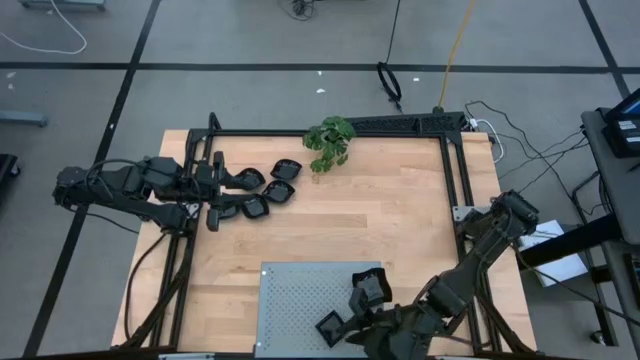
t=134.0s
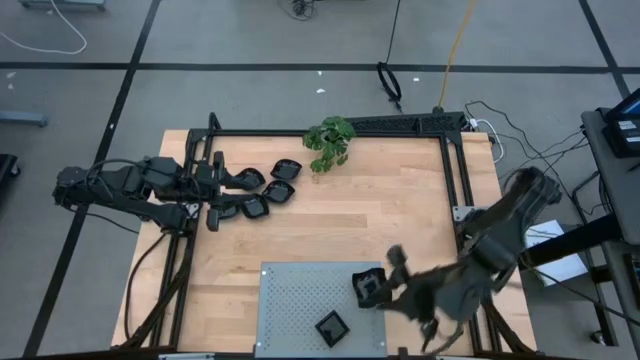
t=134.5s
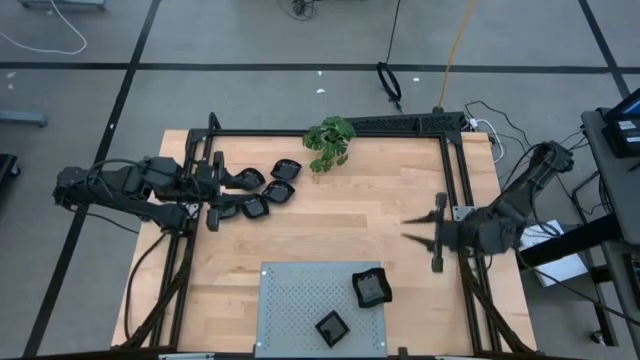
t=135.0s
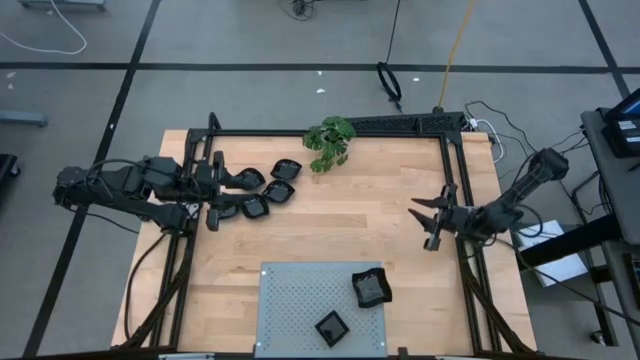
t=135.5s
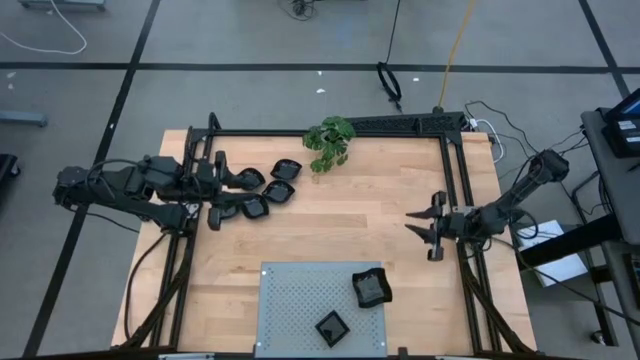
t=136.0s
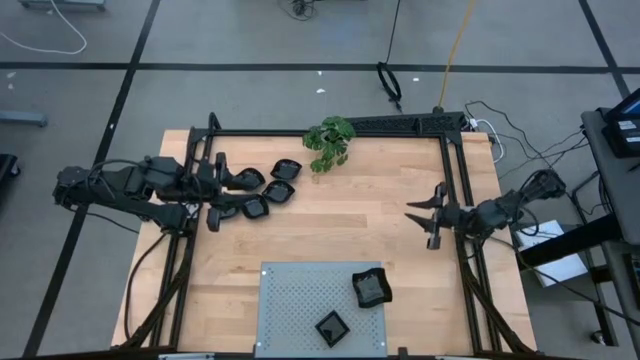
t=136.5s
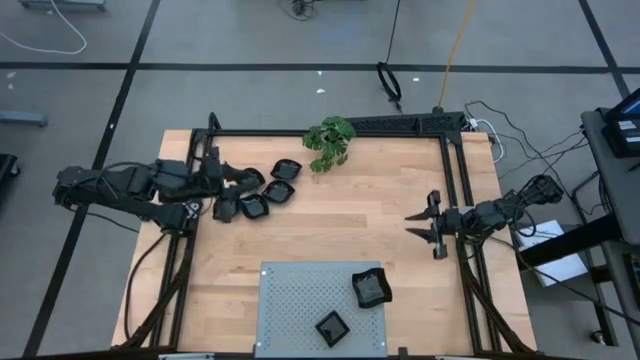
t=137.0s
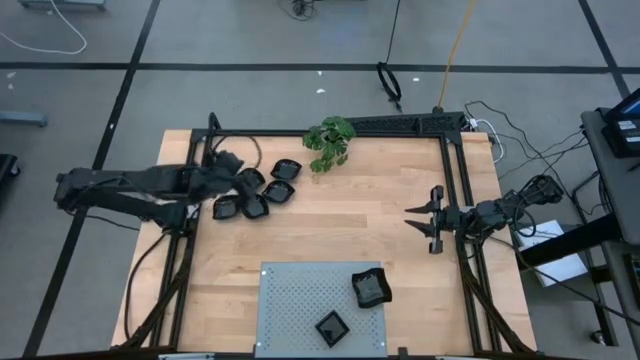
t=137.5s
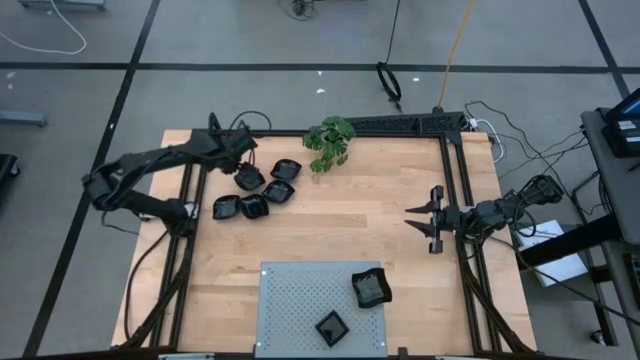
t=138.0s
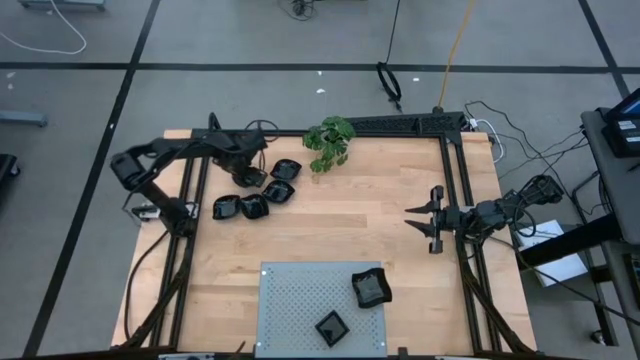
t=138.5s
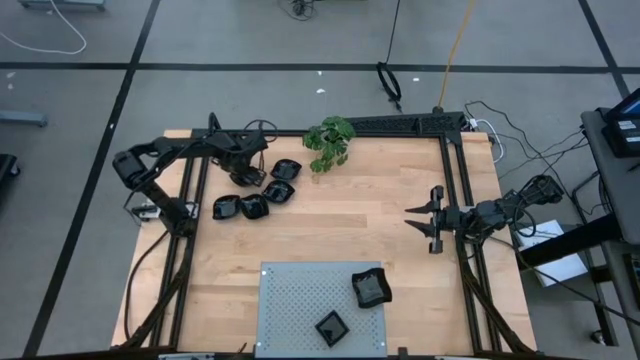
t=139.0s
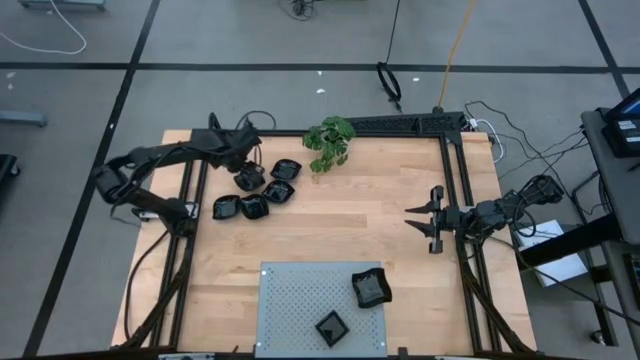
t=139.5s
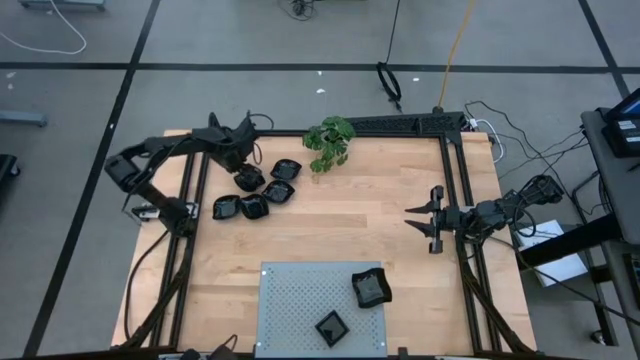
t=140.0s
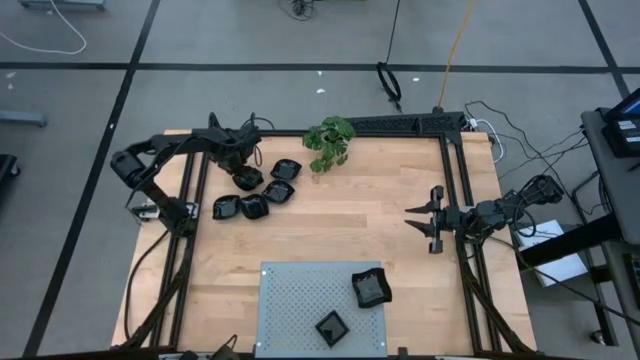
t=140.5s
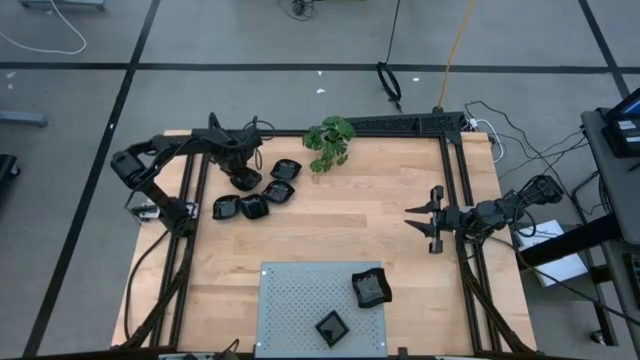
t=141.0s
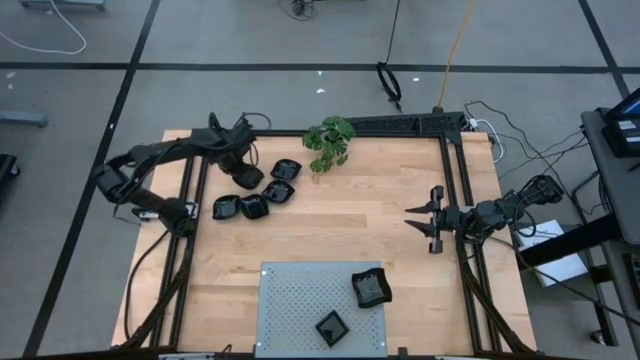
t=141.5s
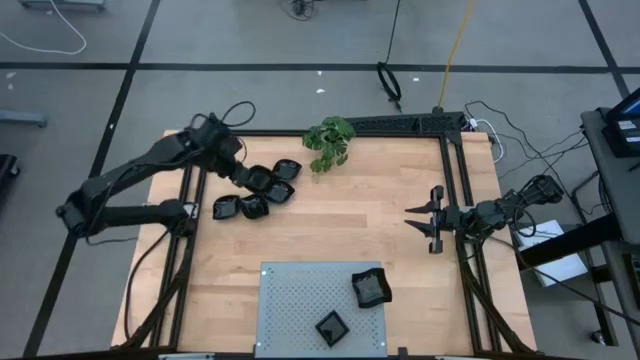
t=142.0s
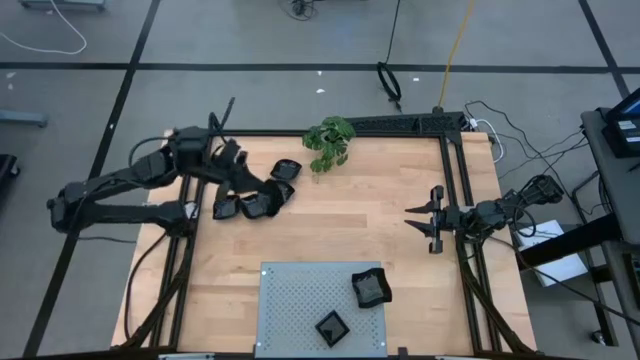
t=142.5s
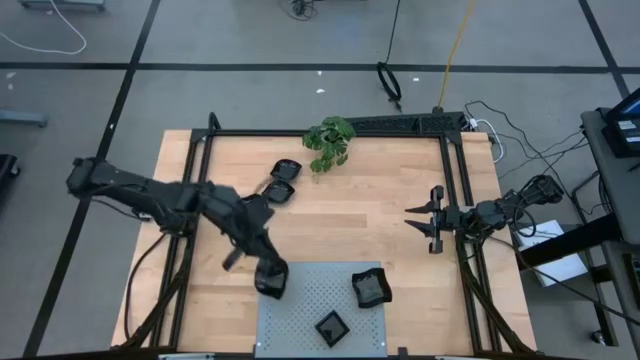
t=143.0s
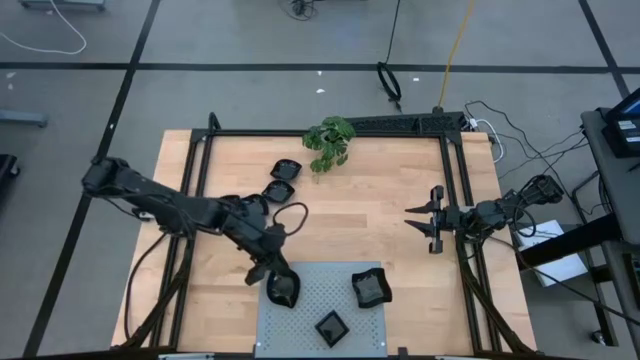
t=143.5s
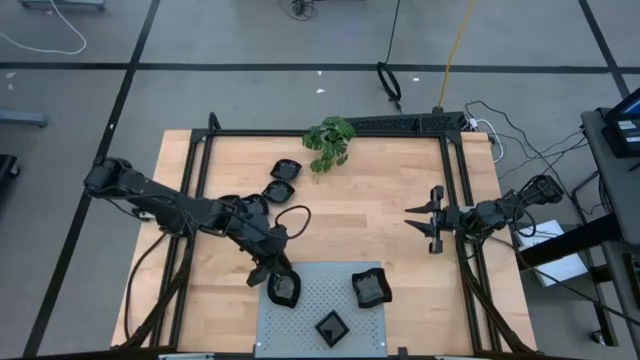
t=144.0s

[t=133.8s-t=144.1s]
Task: Pick & Place Mini shaped plates
Put the leaf-shaped plate on the shelf

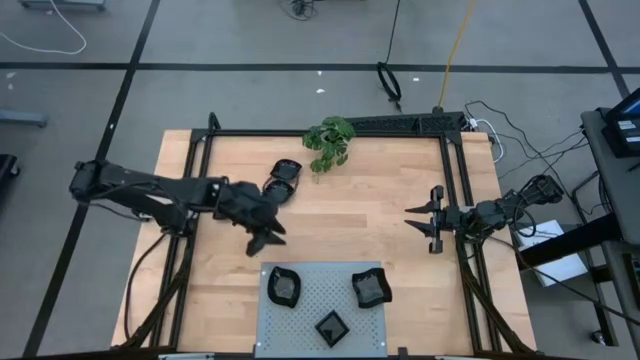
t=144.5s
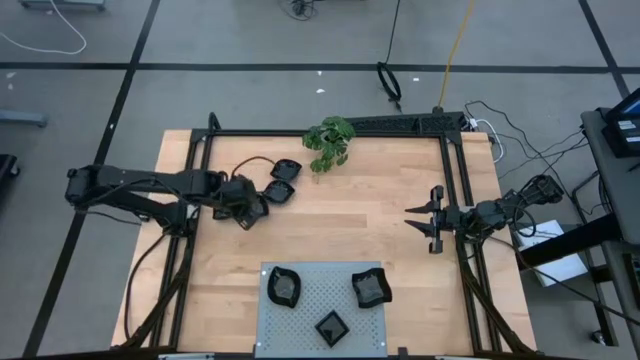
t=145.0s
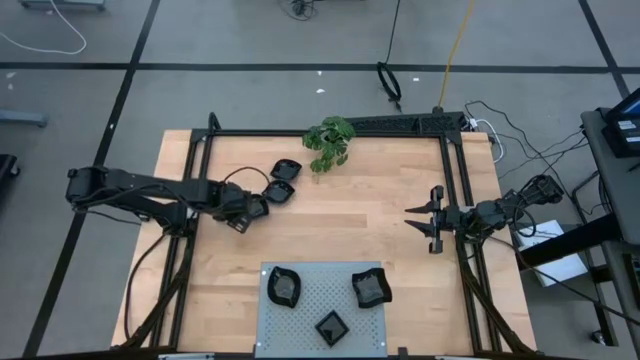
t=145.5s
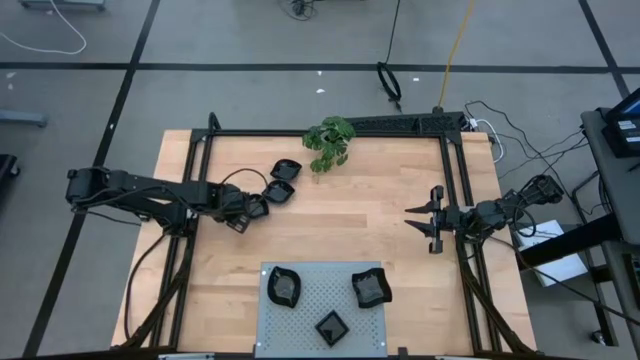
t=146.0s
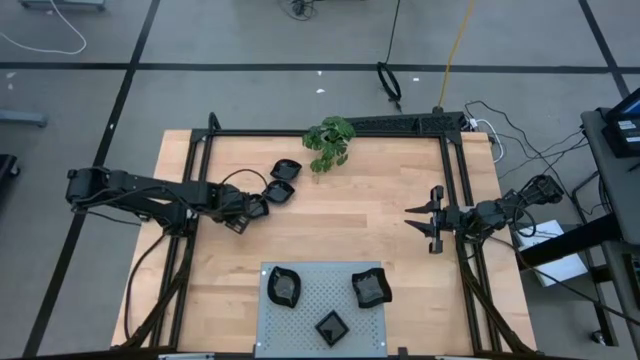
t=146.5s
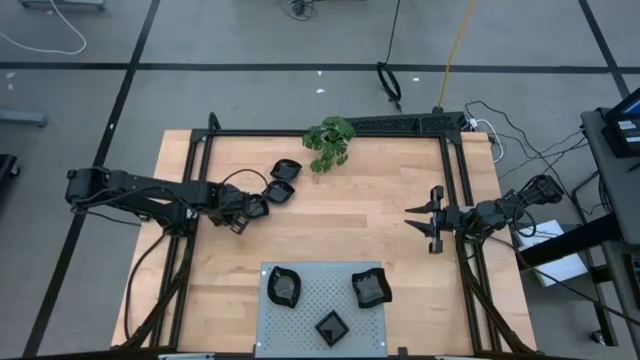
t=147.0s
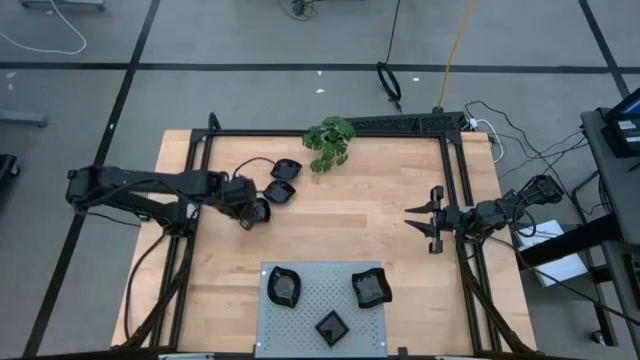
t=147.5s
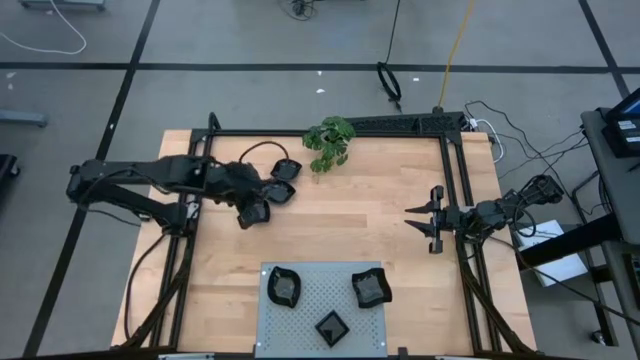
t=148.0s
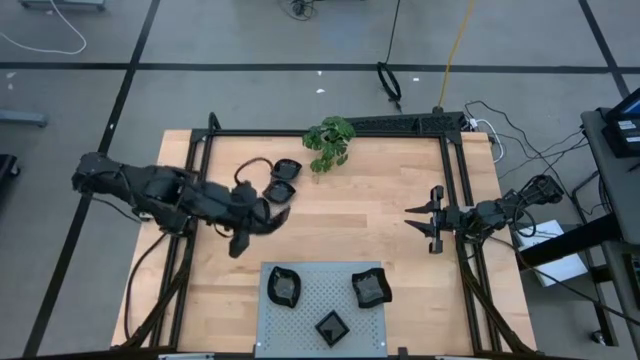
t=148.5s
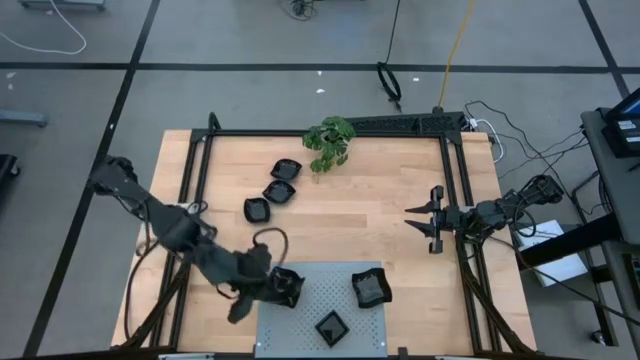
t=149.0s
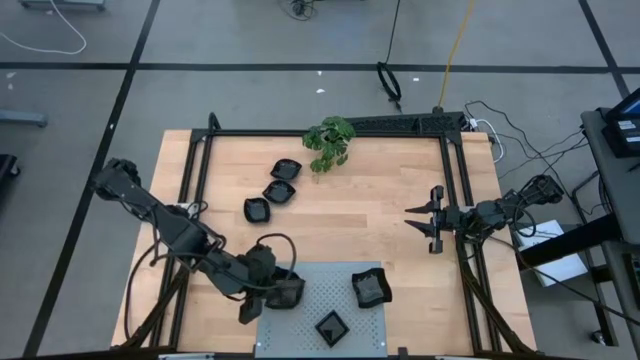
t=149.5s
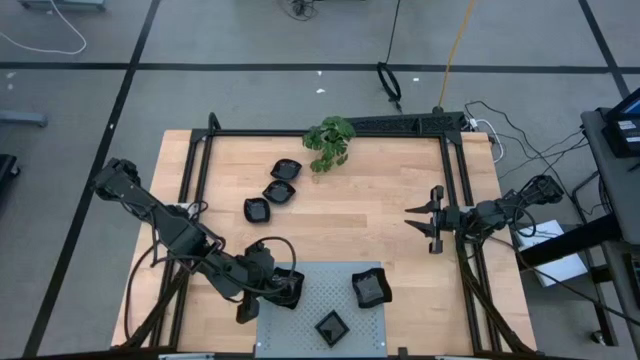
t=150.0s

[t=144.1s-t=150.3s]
Stack the leaf-shaped plate onto the other leaf-shaped plate on the shelf

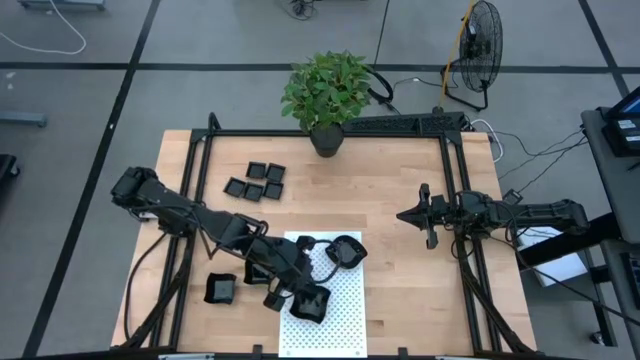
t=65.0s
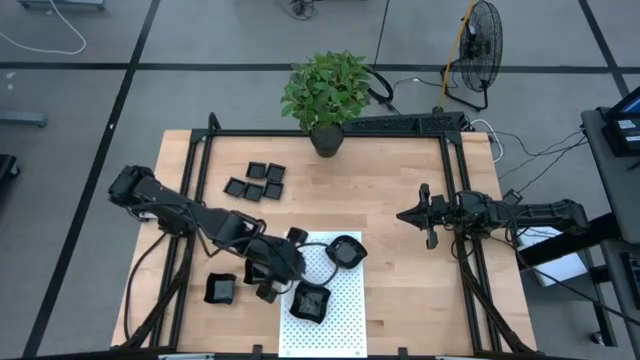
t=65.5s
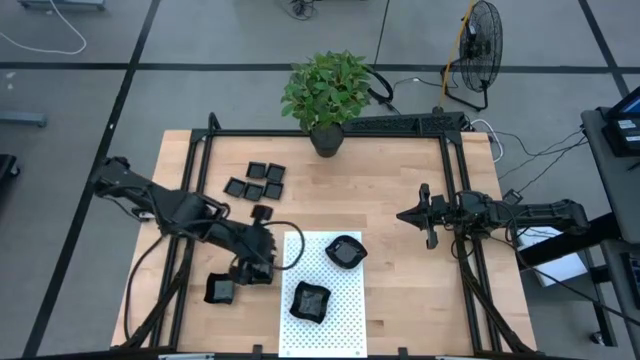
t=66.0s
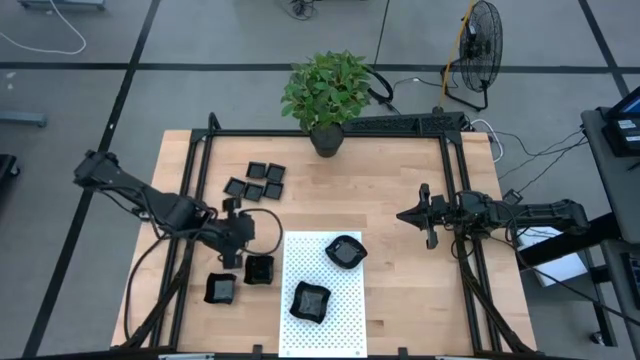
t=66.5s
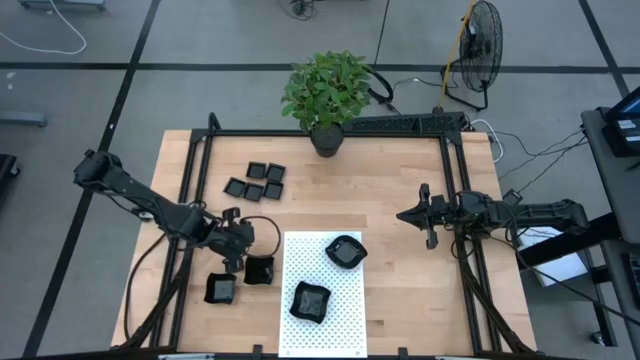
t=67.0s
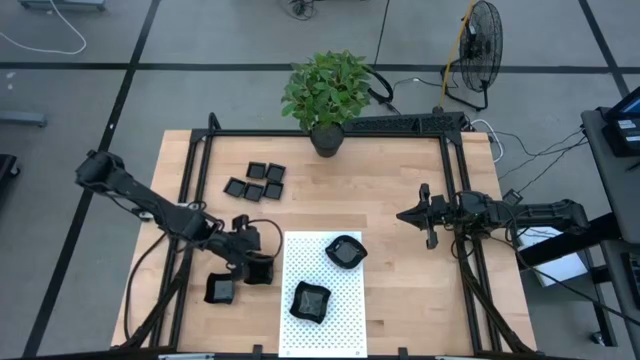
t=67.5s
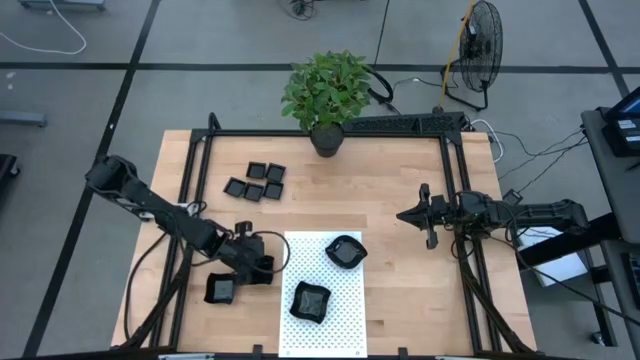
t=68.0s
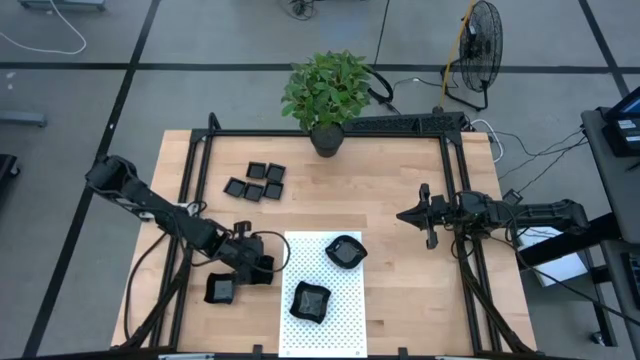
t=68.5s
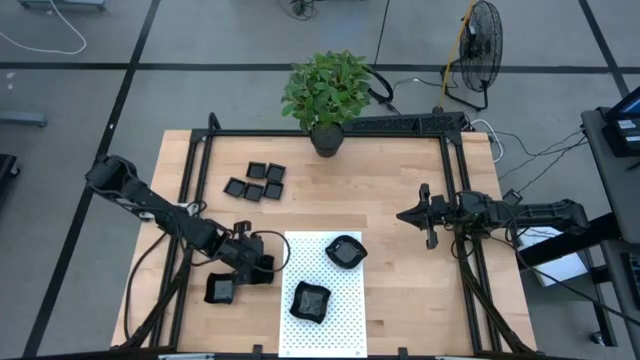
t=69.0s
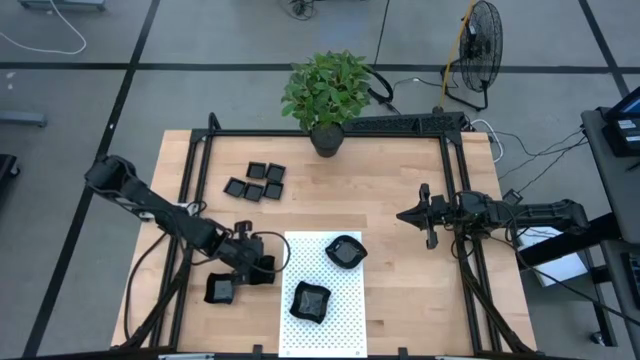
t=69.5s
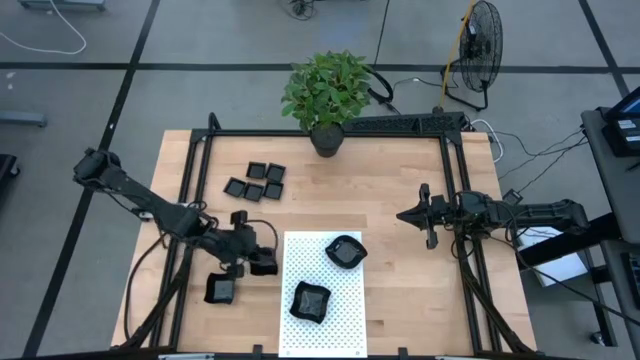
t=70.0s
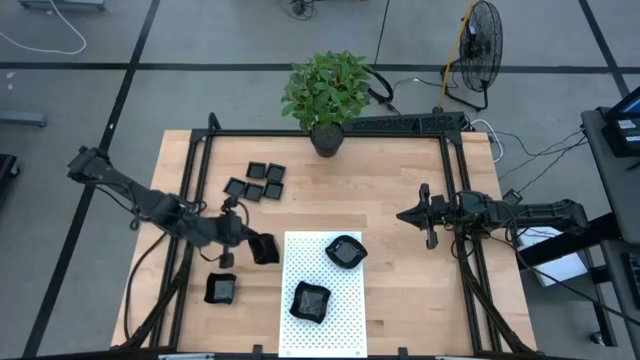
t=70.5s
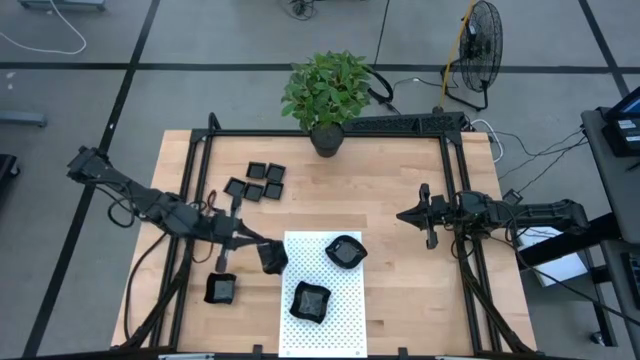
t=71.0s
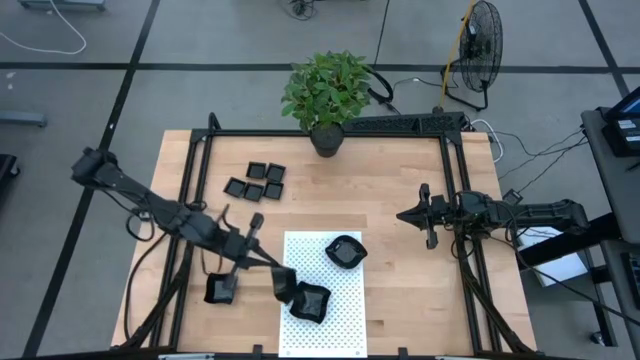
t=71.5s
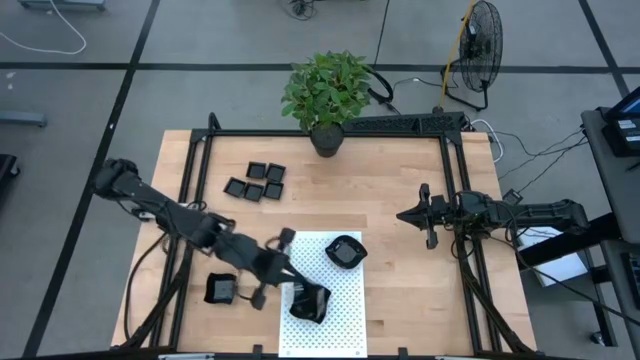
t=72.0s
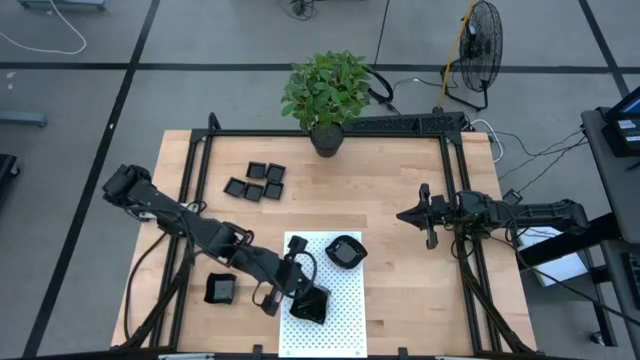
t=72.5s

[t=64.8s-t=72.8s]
Task: Pick & Place Mini shaped plates
Stack the right distorted square plate on top of the distorted square plate on the shelf
